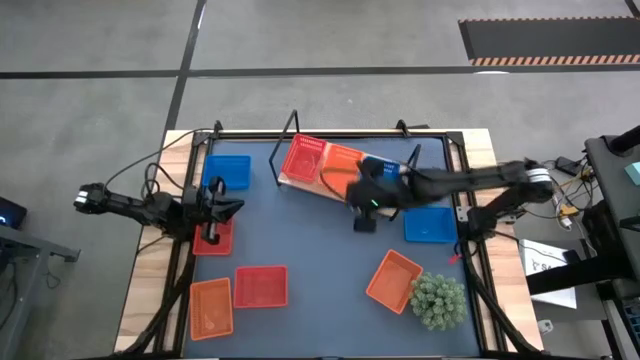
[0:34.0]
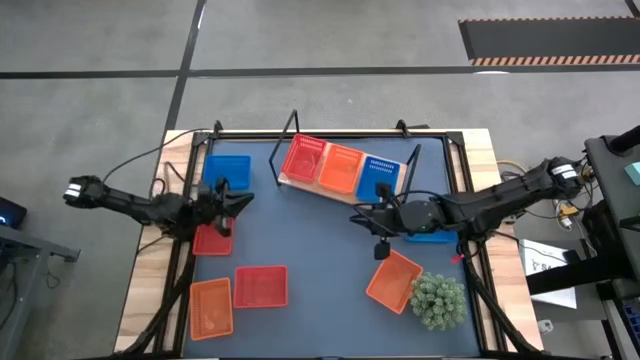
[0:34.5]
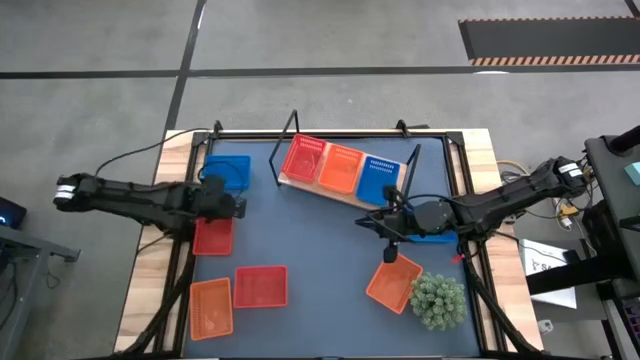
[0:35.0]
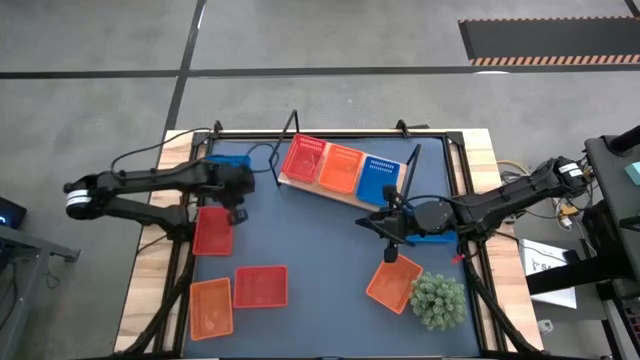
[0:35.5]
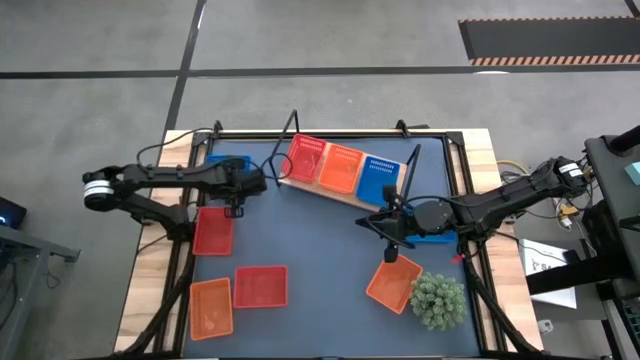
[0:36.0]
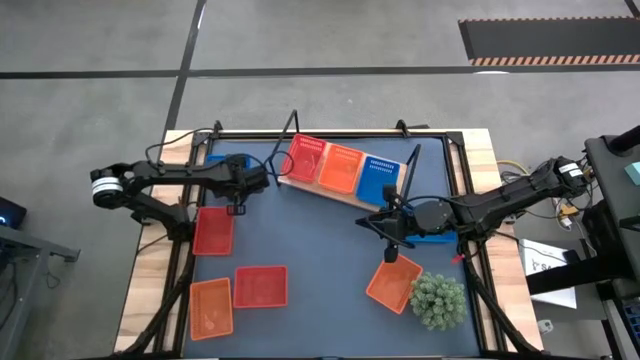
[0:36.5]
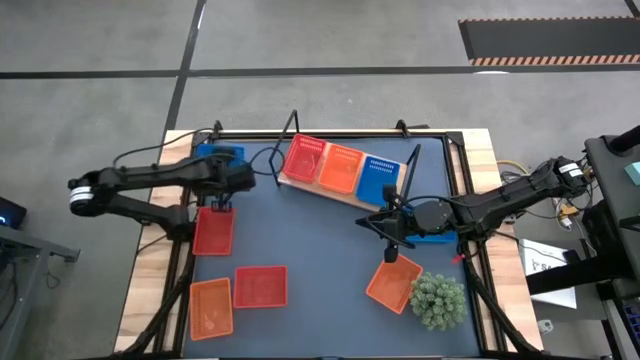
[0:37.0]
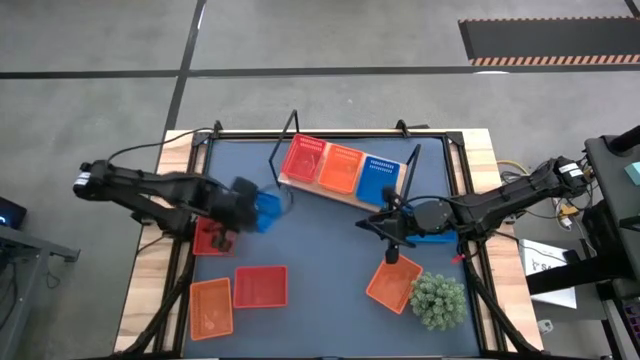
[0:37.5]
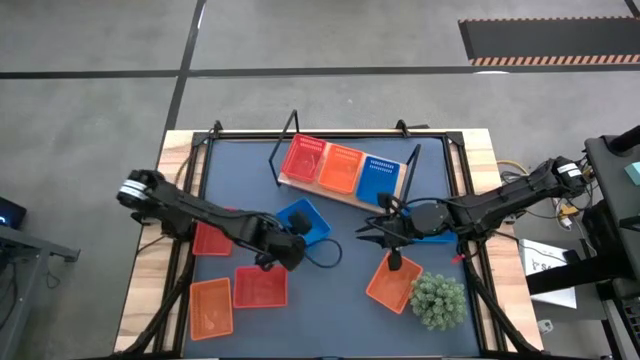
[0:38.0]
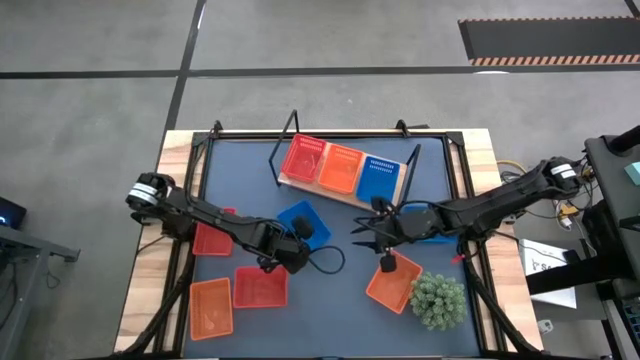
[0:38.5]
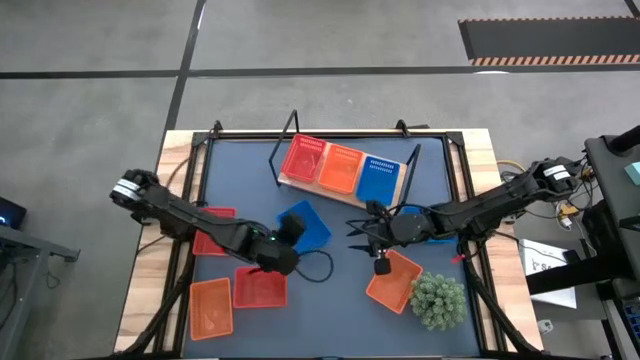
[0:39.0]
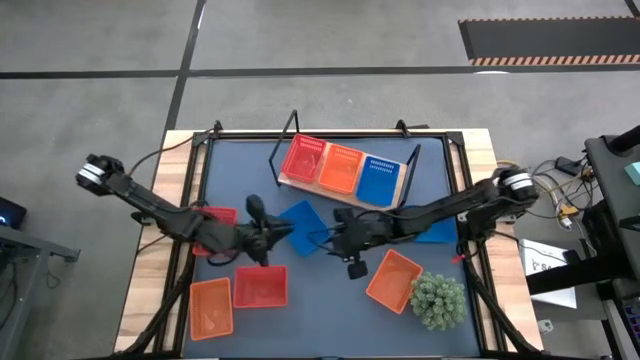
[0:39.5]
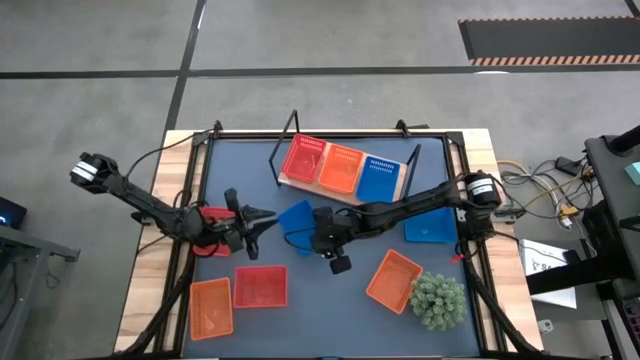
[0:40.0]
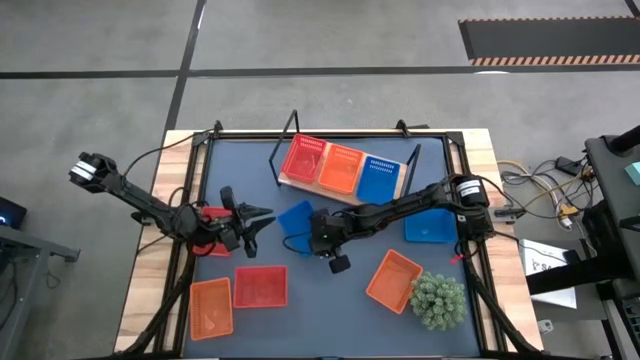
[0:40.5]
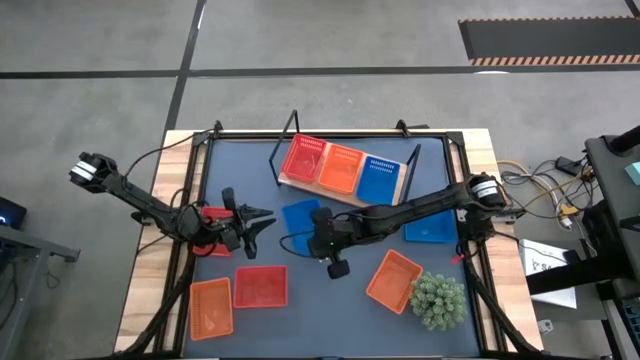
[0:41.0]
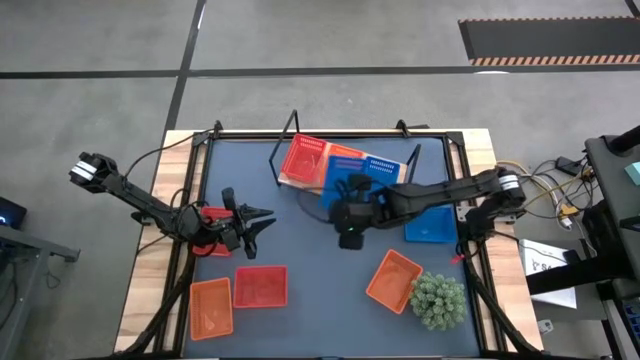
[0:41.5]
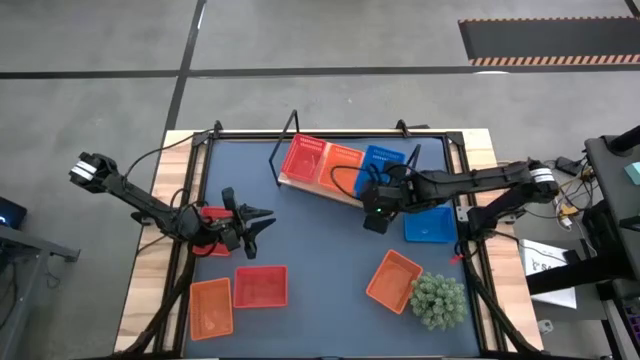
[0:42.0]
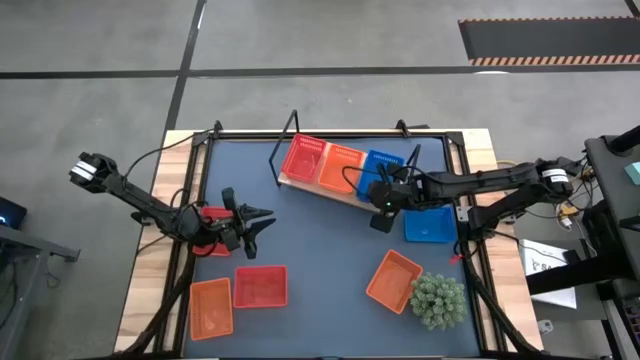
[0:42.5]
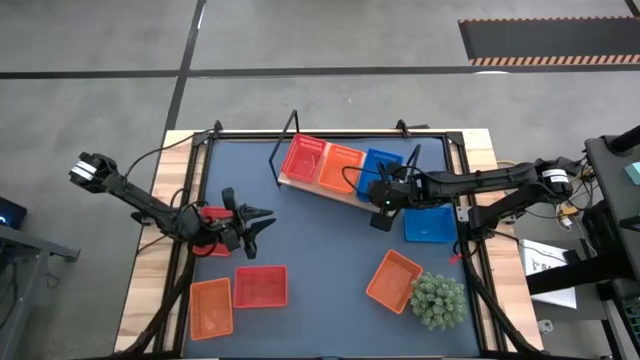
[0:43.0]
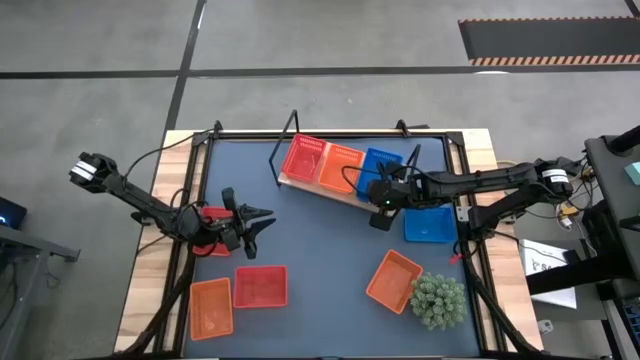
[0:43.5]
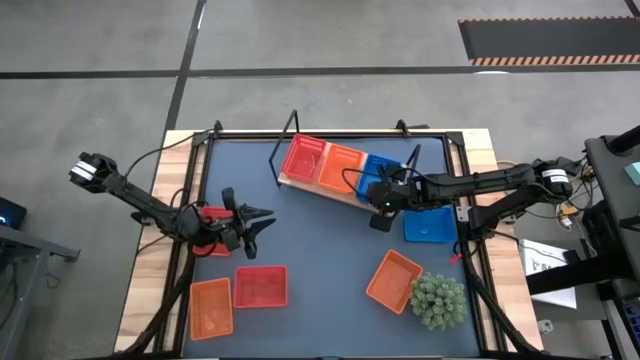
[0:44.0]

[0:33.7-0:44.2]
Task: Stack baskets on shelf by color
Stack the left blue bin on top of the blue bin on the shelf

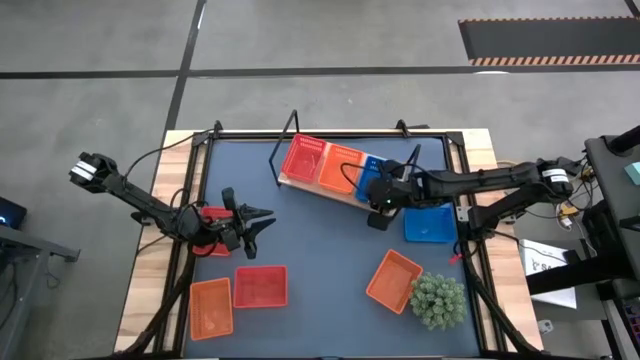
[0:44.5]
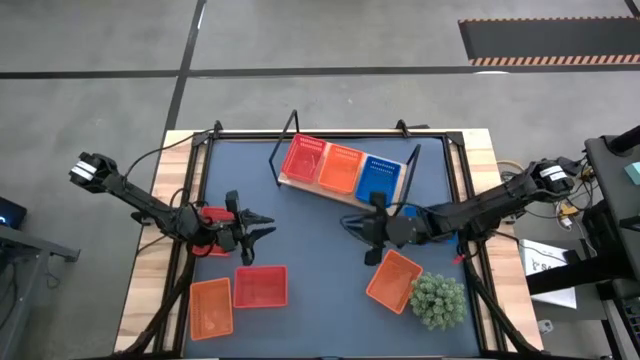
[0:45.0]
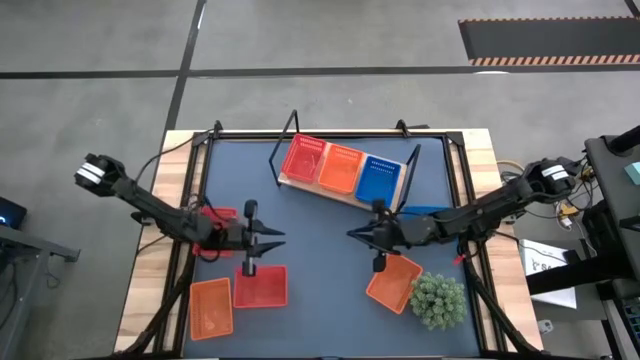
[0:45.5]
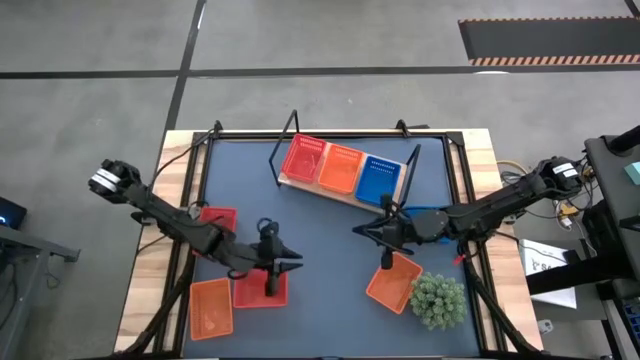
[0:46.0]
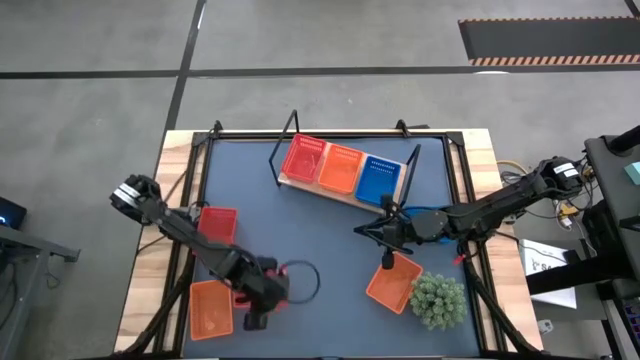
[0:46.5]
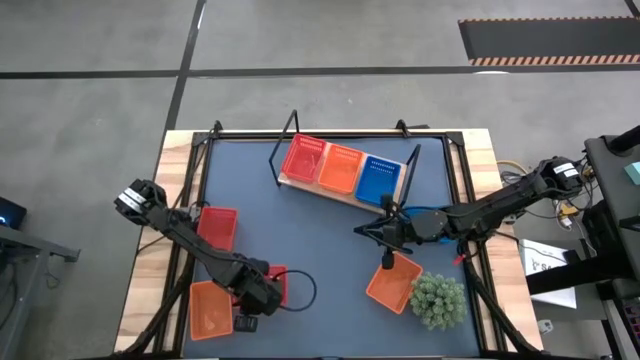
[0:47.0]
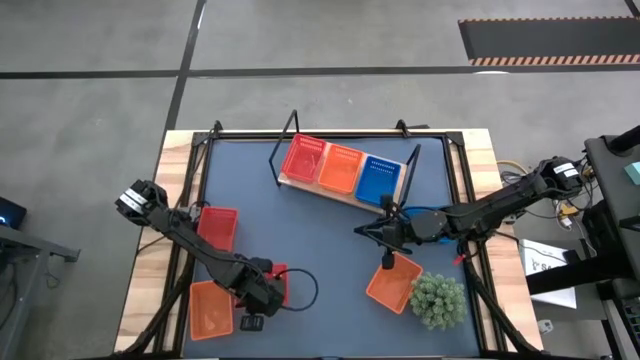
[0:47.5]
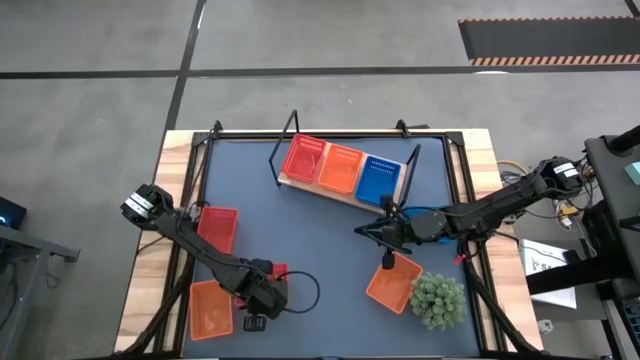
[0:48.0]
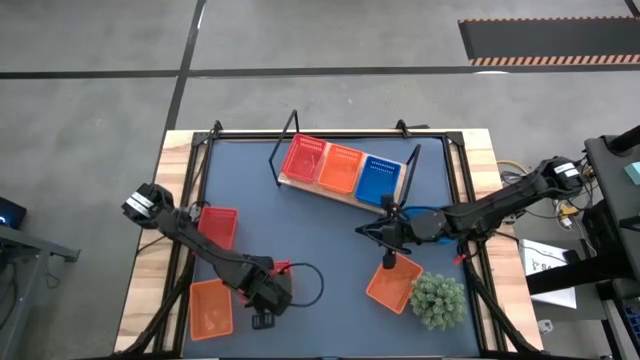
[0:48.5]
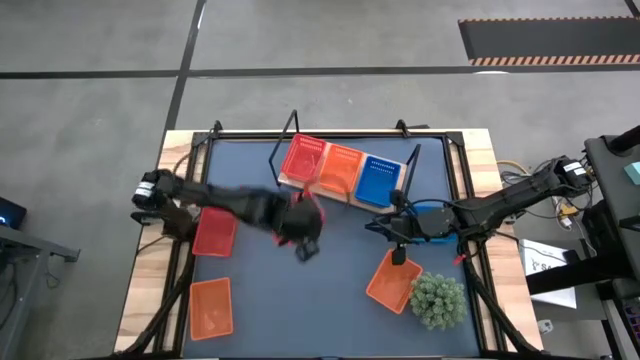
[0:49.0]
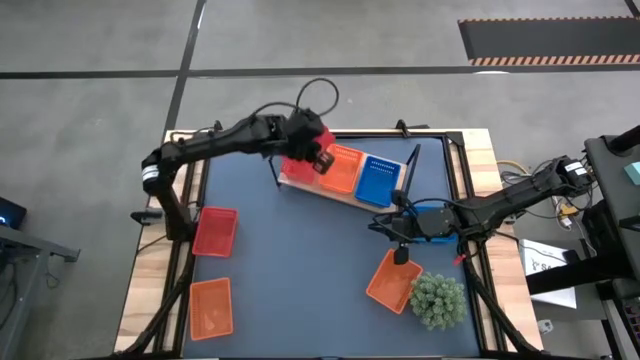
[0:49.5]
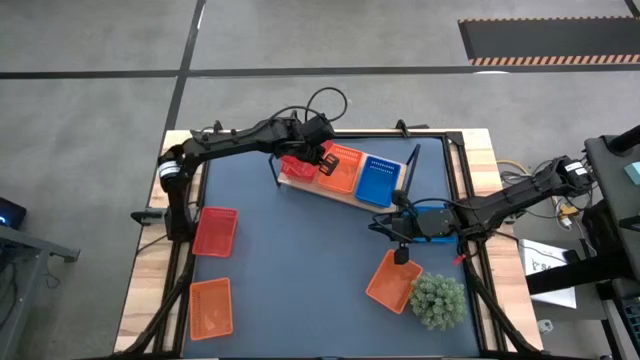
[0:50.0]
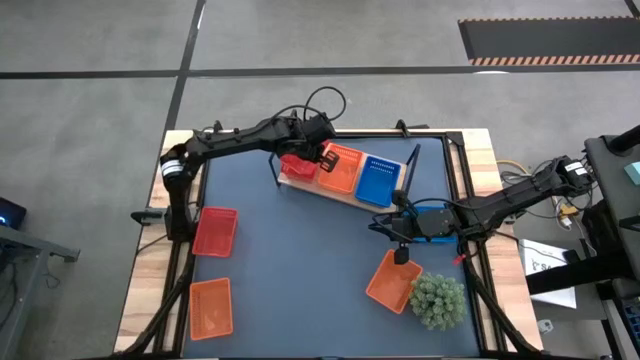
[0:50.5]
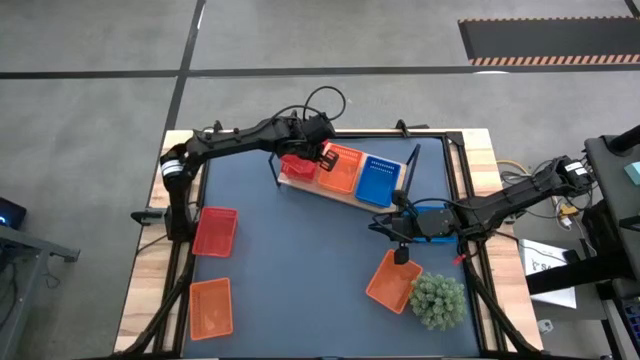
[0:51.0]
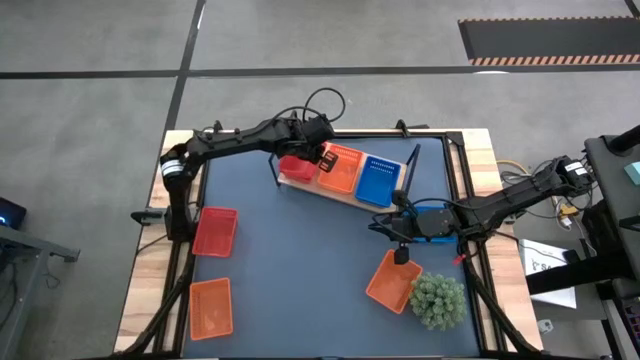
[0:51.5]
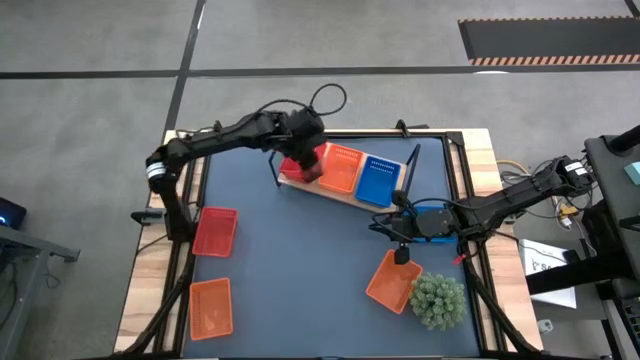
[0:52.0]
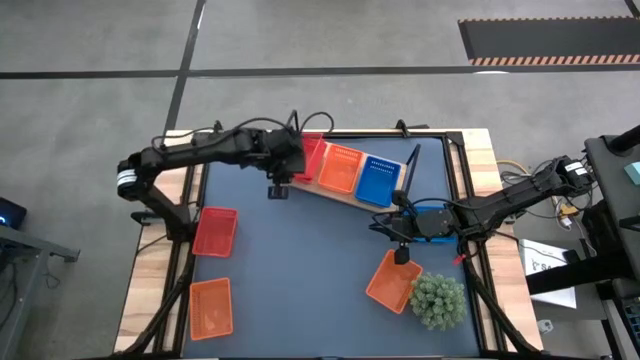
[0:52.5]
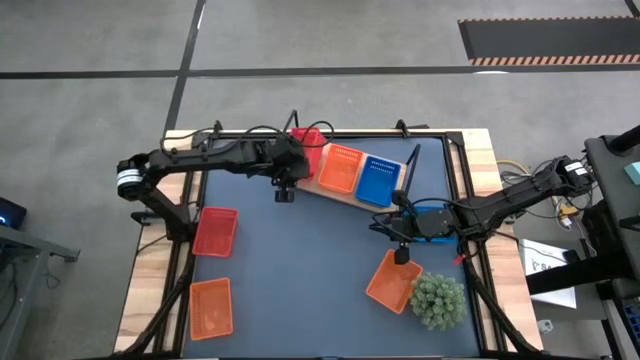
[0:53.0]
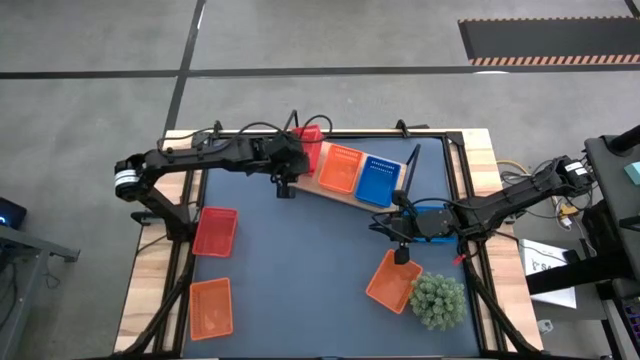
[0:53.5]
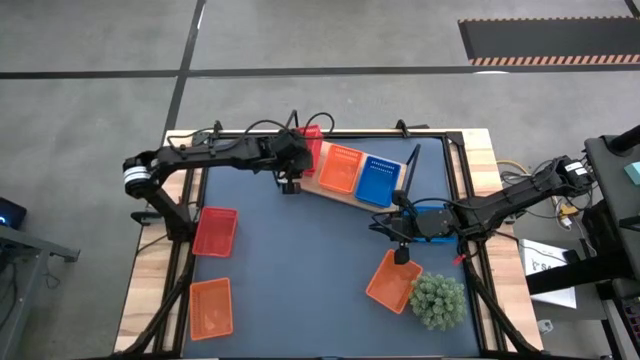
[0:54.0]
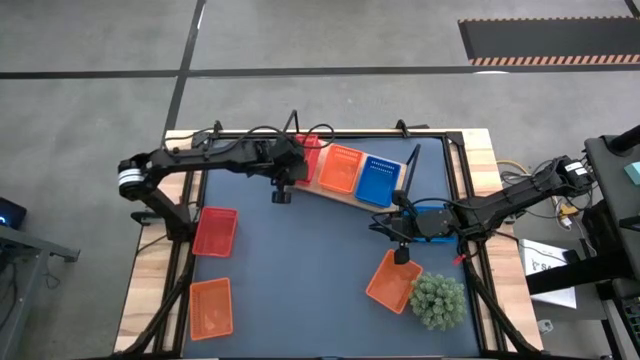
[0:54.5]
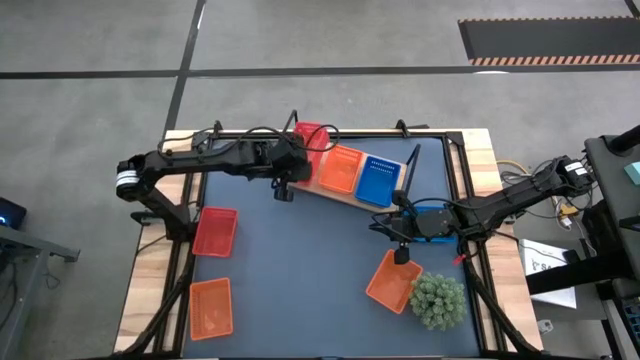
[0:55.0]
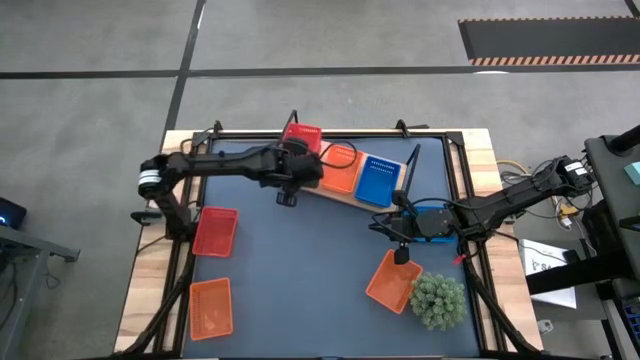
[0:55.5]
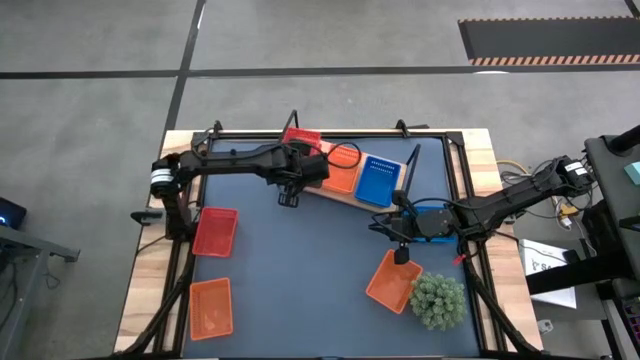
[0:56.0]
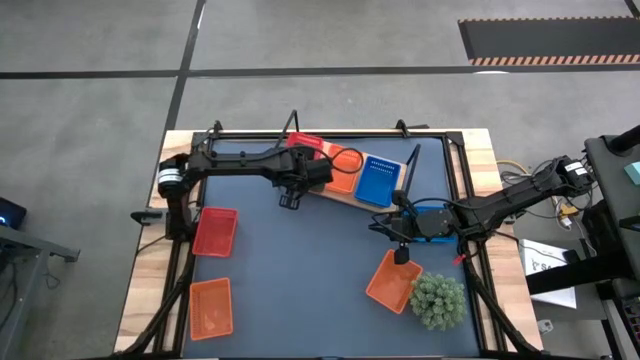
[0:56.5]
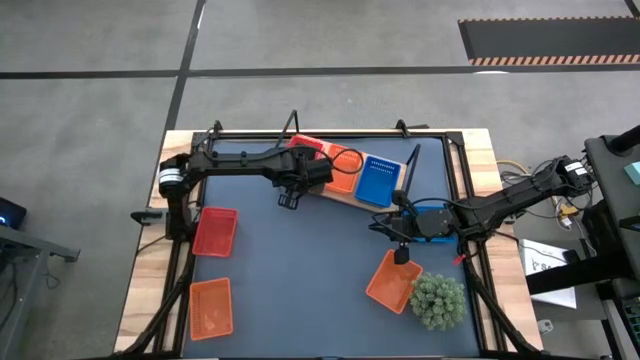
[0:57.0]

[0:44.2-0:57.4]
Stack the bottom red bin on top of the red bin on the shelf
